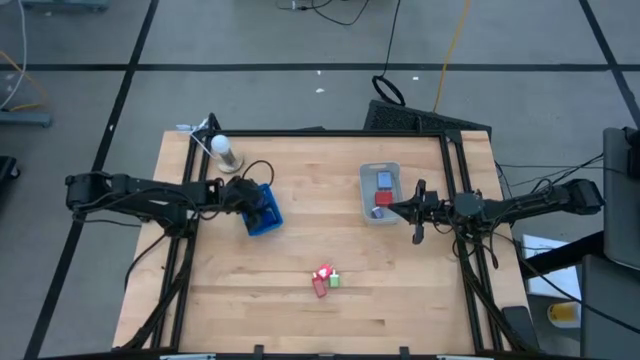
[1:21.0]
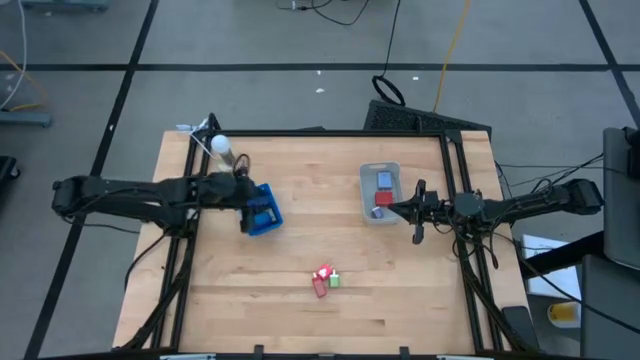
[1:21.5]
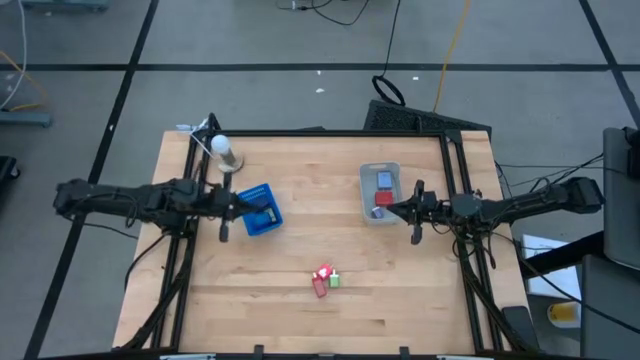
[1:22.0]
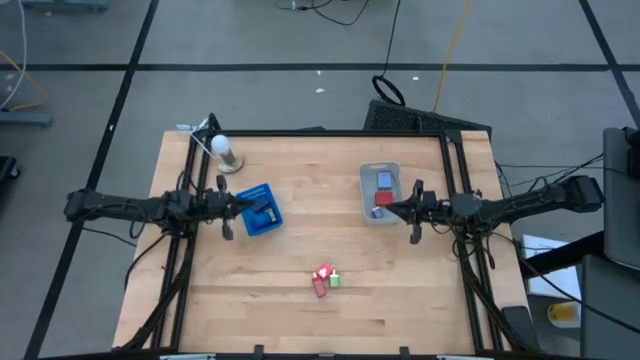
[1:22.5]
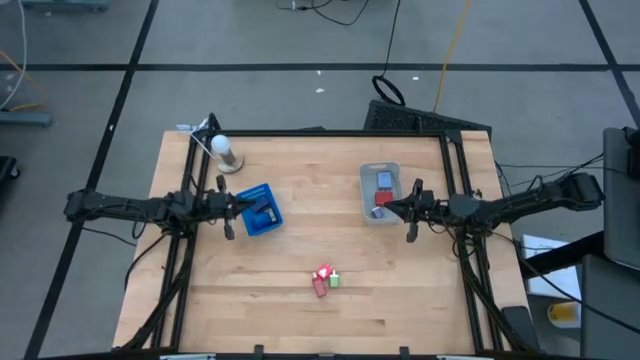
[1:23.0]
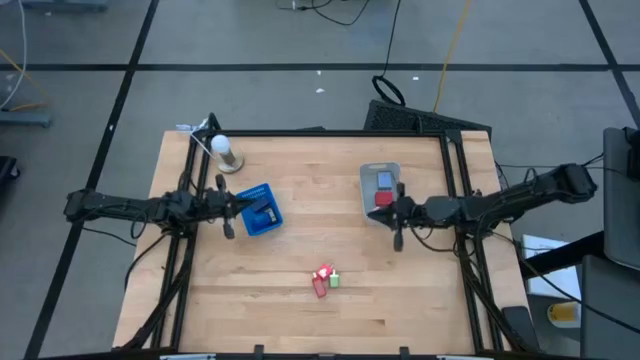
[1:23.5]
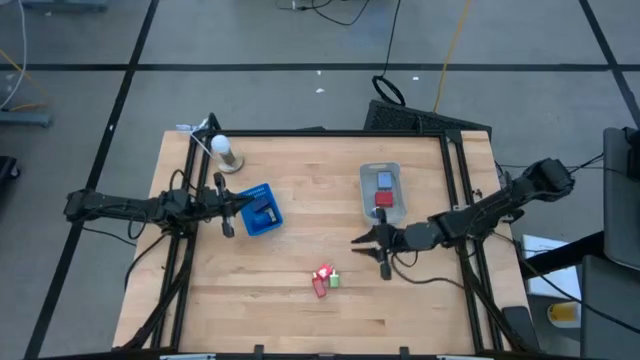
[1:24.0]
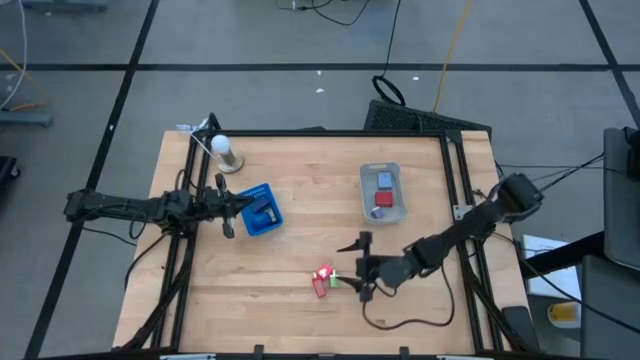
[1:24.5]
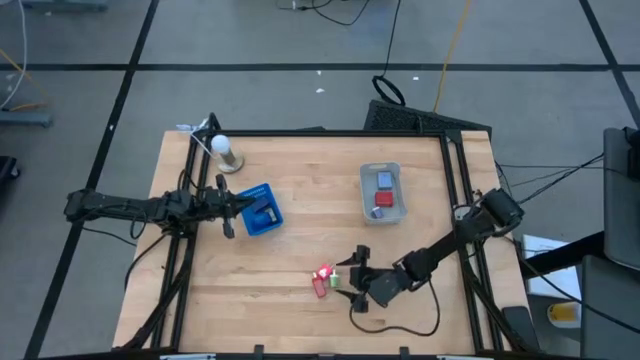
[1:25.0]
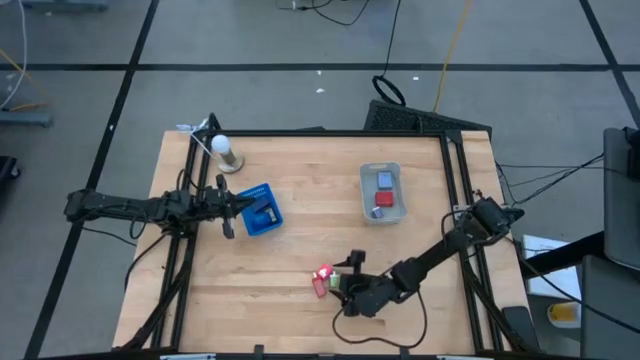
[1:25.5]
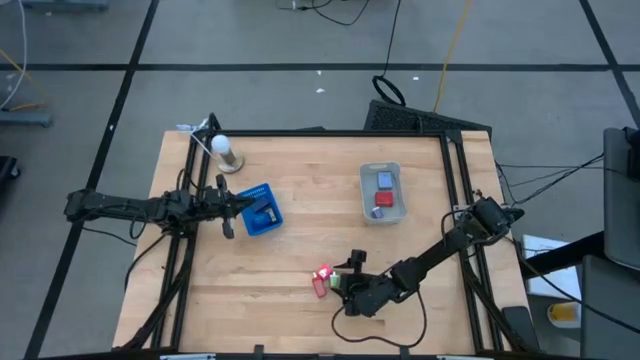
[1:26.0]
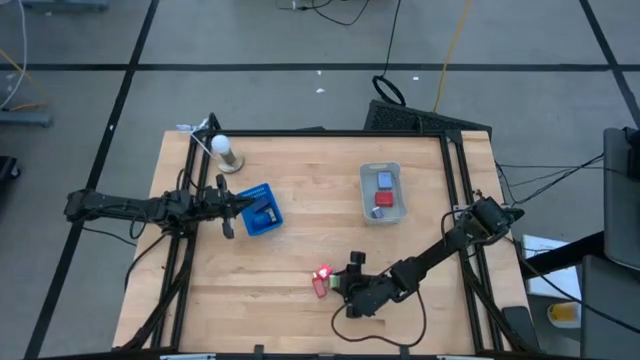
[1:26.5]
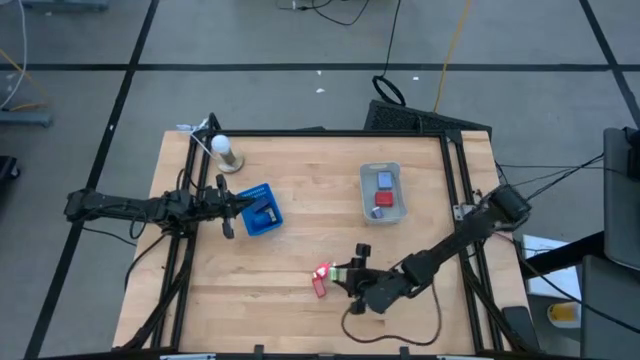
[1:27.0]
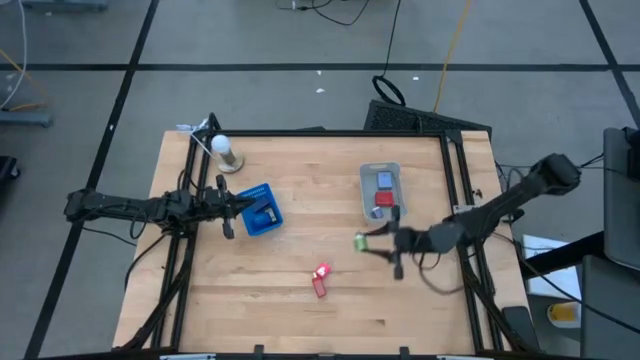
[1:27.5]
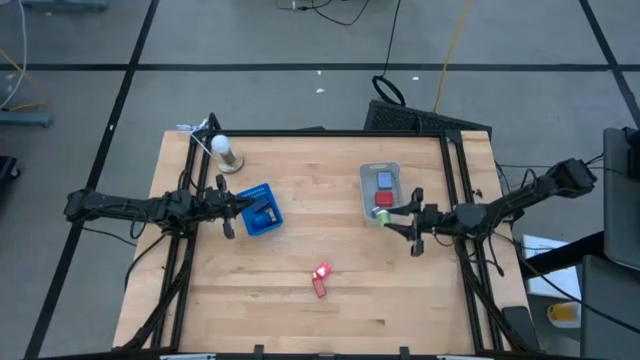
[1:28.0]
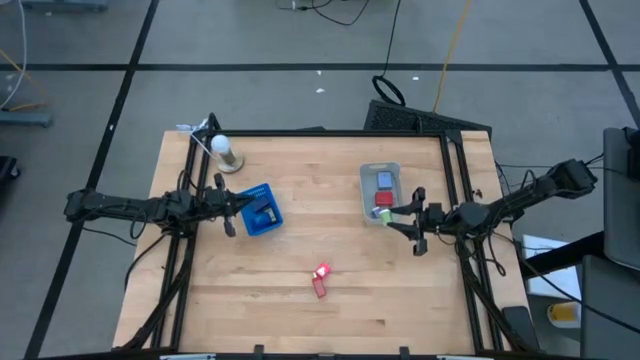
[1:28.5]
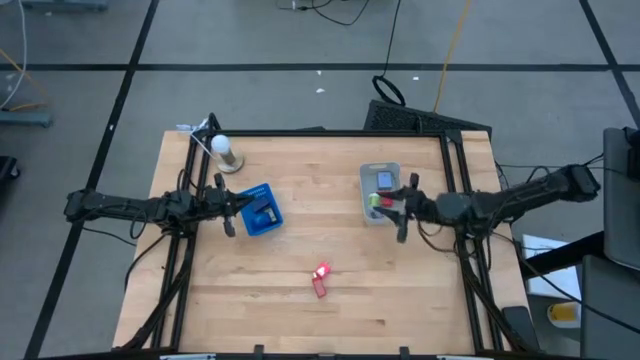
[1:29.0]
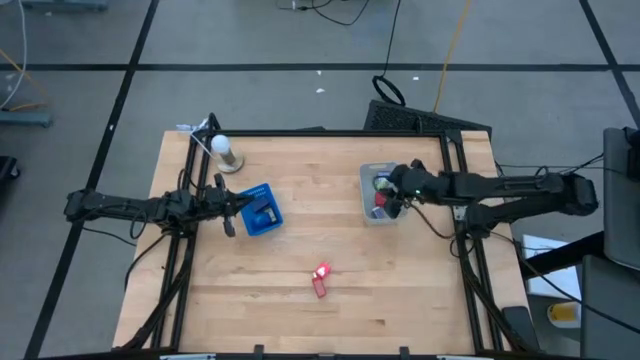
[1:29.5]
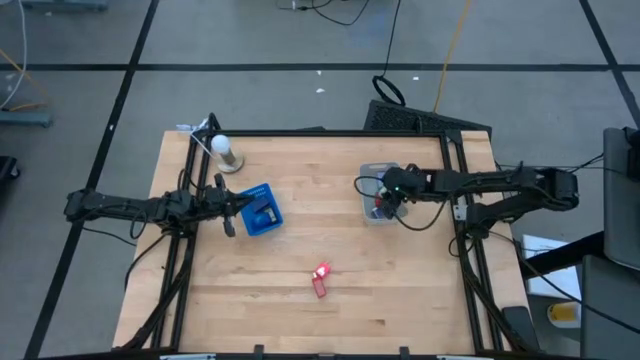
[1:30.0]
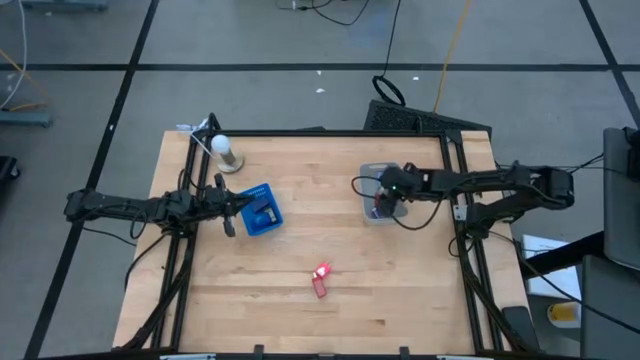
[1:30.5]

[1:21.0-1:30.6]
Task: Pick & Place Office items
Put the green charger adapter into the grey bin

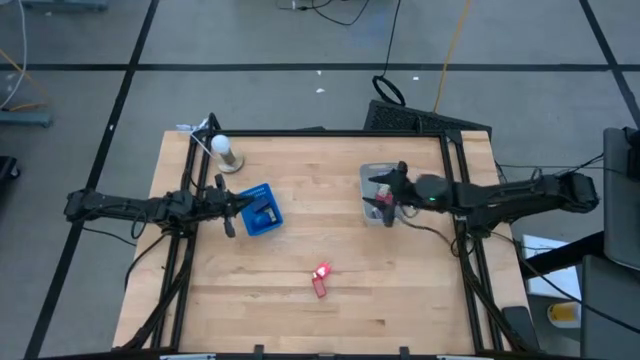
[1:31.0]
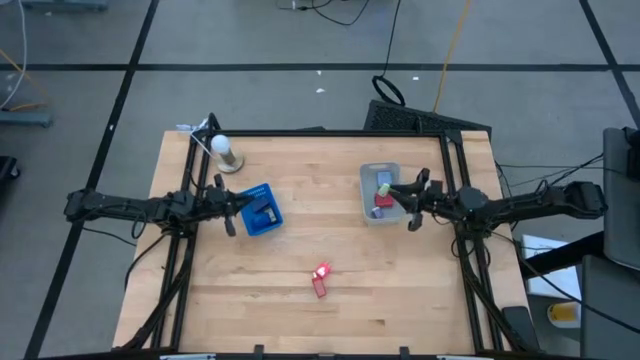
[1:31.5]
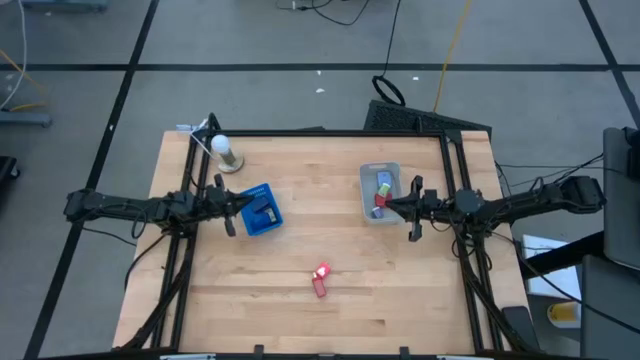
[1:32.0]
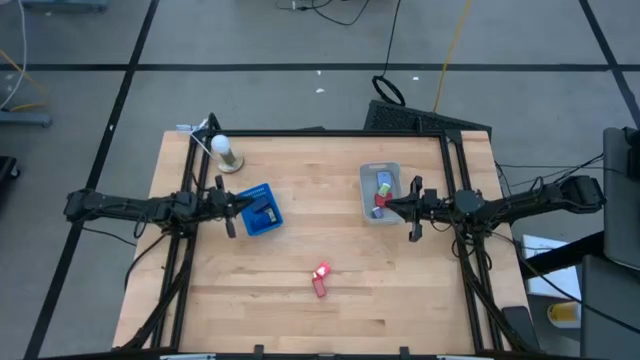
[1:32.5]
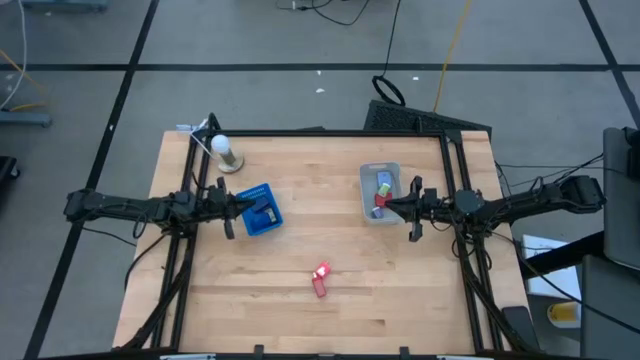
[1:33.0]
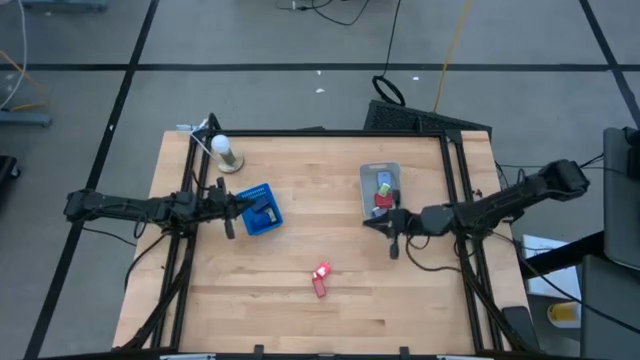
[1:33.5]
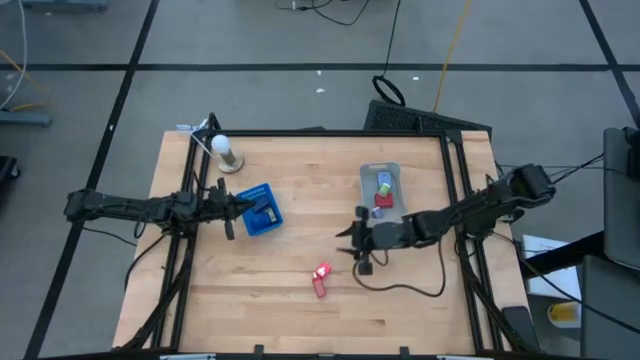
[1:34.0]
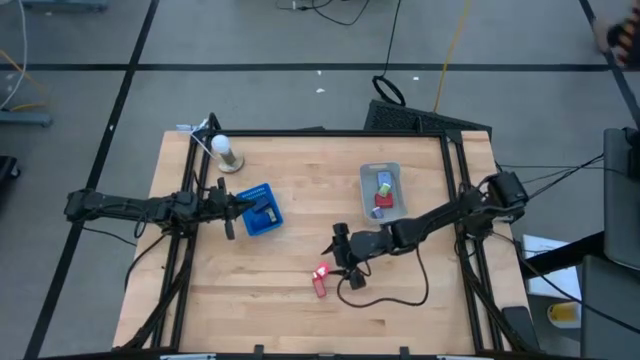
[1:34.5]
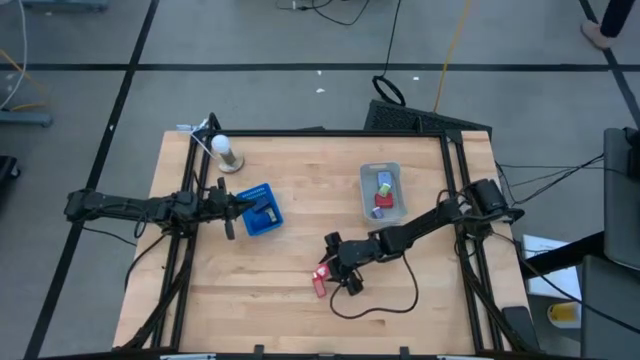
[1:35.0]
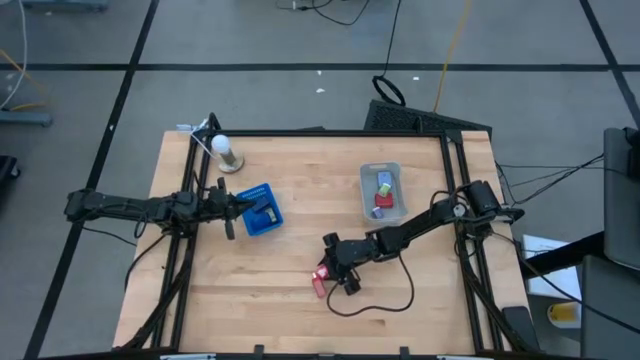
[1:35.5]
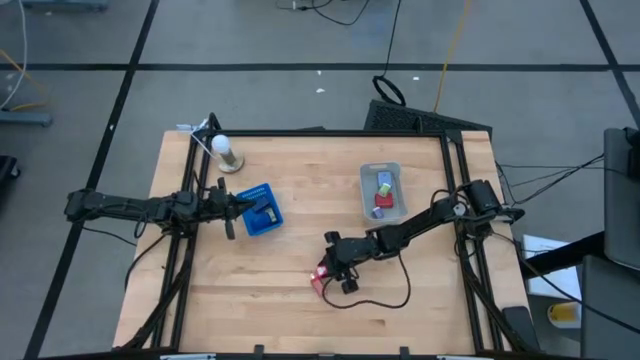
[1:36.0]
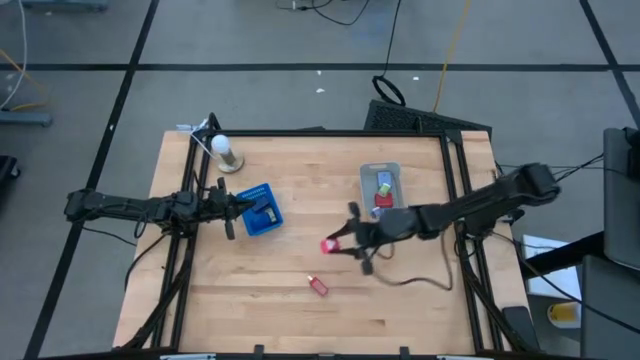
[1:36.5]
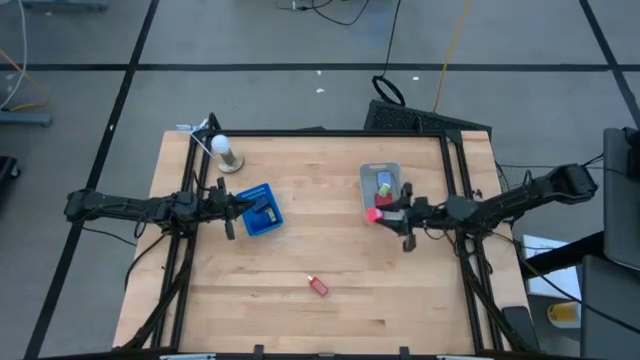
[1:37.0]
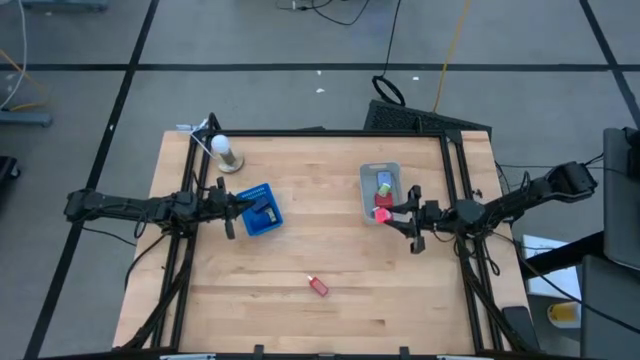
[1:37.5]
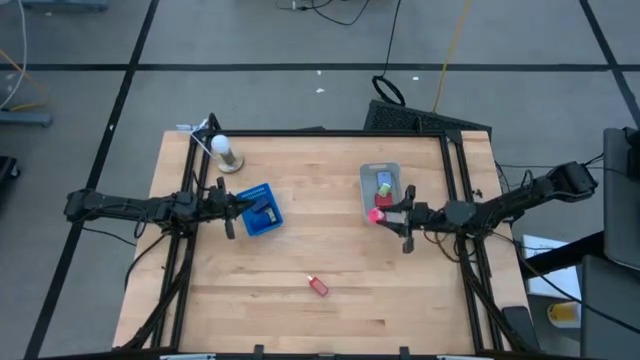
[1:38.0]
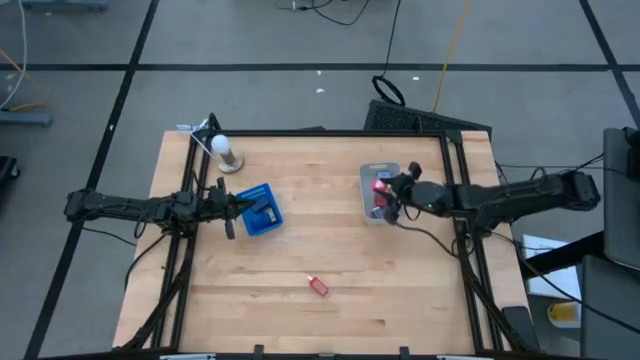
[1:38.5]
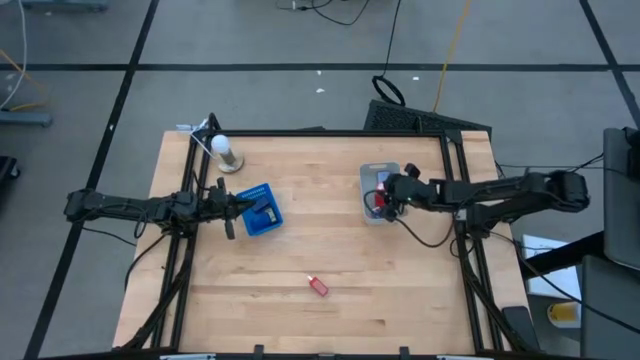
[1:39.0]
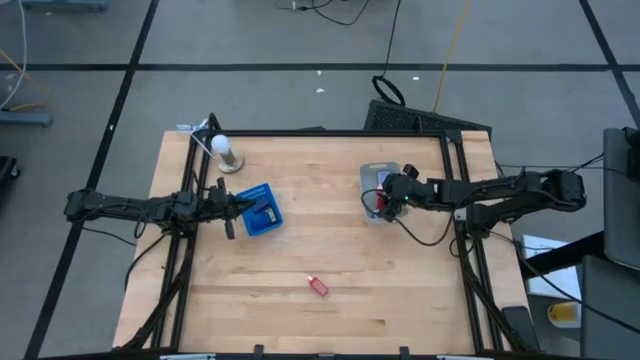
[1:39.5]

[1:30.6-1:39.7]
Put the pink charger adapter into the grey bin

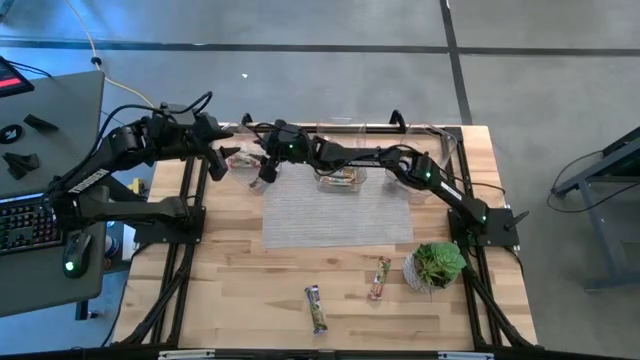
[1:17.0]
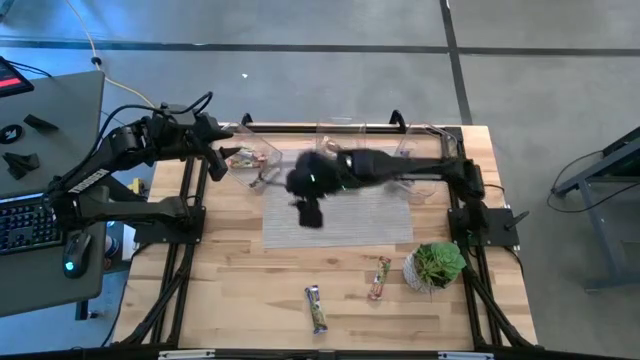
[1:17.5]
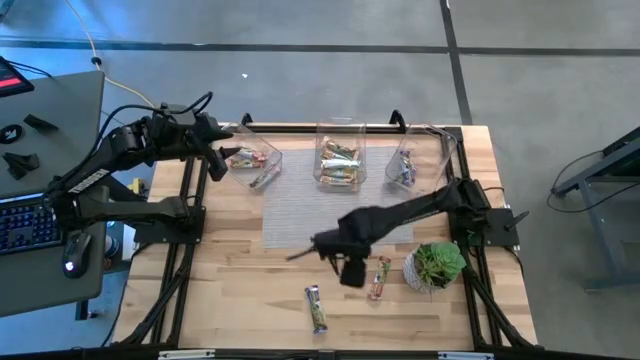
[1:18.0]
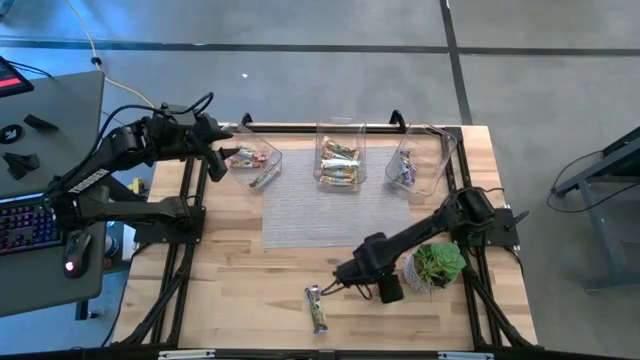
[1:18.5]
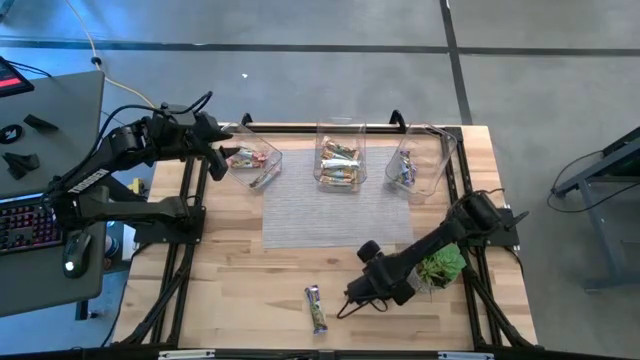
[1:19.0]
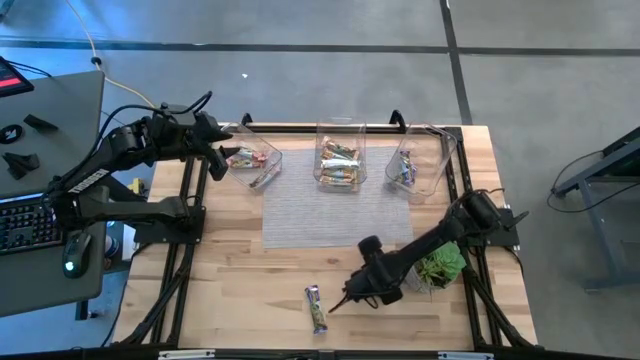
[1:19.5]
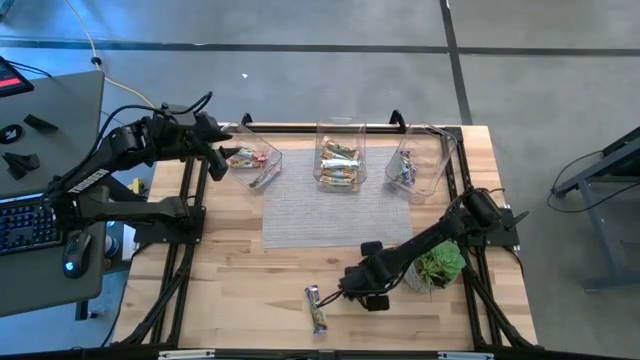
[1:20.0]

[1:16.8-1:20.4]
Task: Pick and place Granola Bars by type
Put the red granola bar into the left transparent bin
